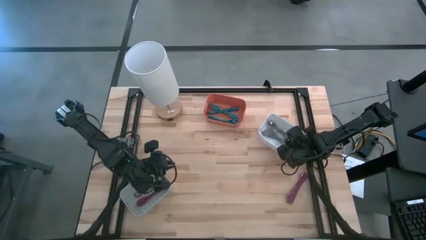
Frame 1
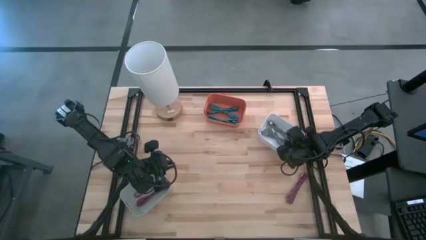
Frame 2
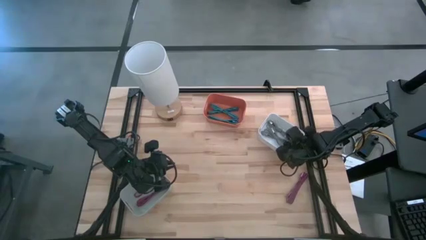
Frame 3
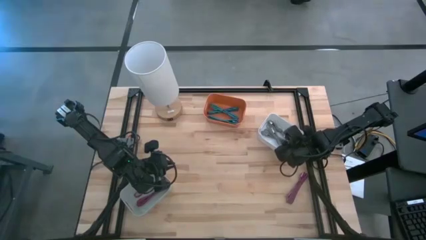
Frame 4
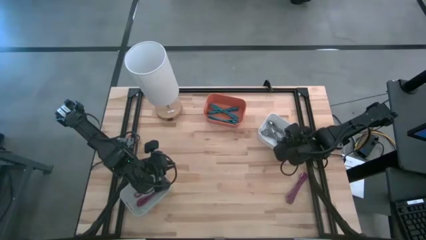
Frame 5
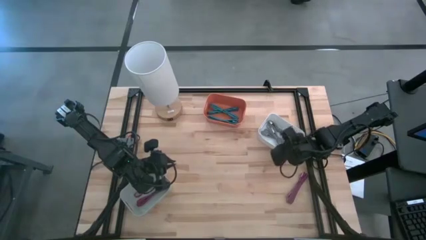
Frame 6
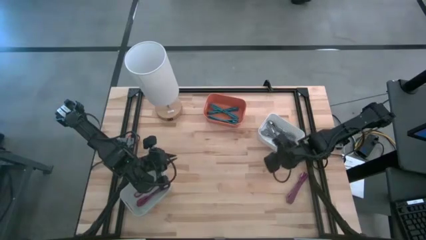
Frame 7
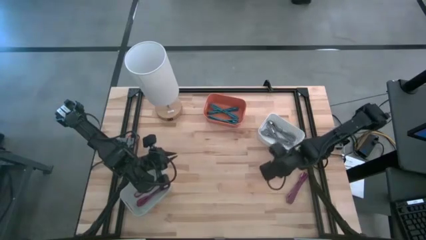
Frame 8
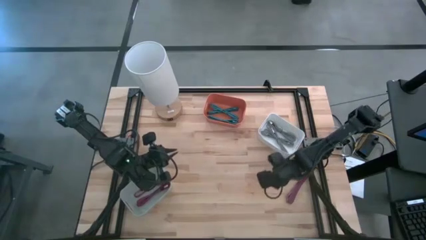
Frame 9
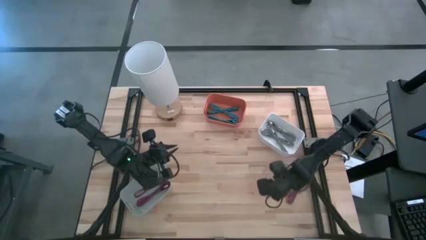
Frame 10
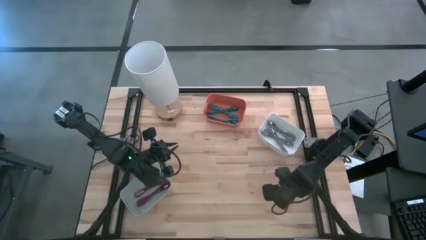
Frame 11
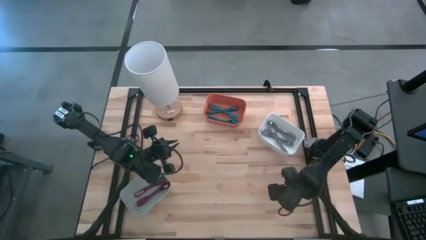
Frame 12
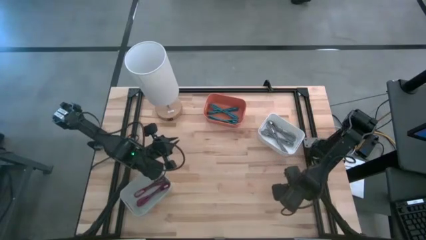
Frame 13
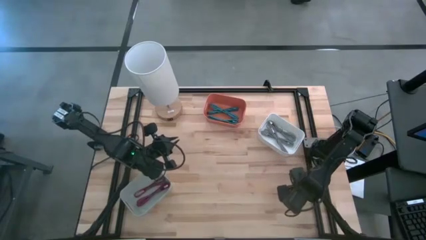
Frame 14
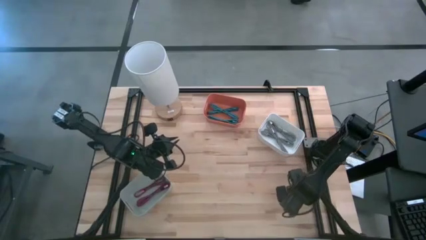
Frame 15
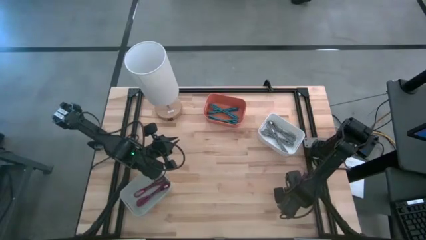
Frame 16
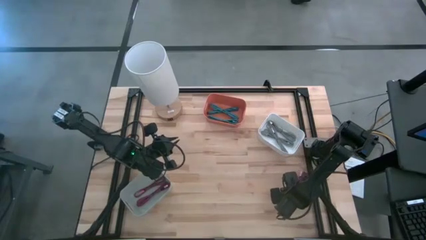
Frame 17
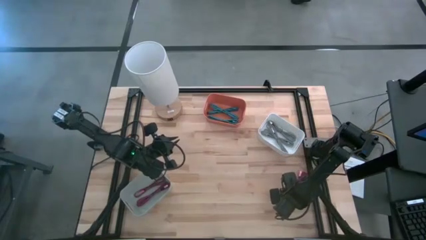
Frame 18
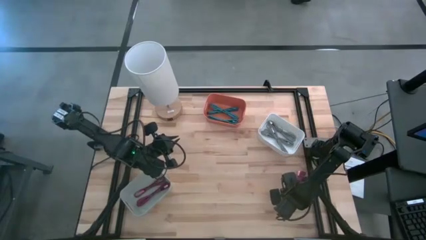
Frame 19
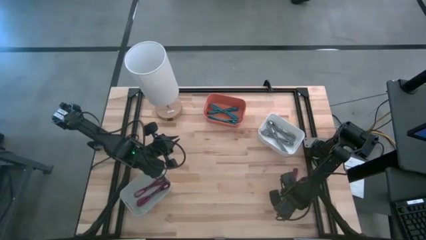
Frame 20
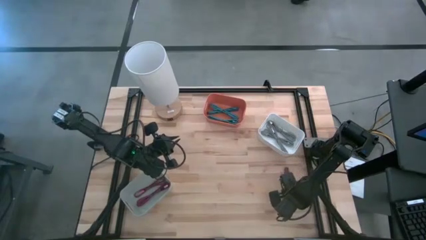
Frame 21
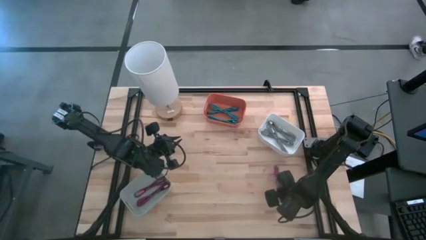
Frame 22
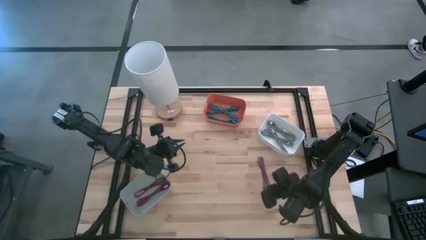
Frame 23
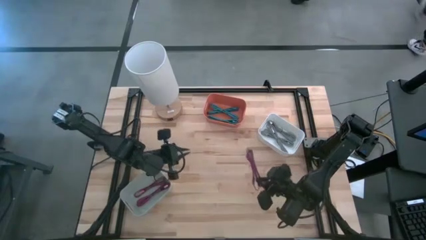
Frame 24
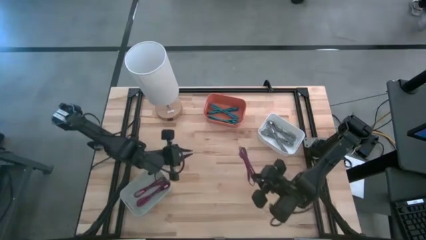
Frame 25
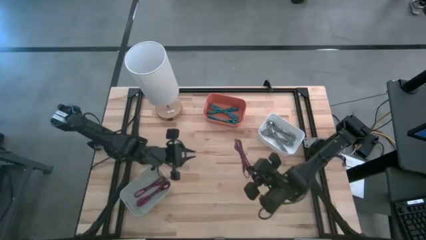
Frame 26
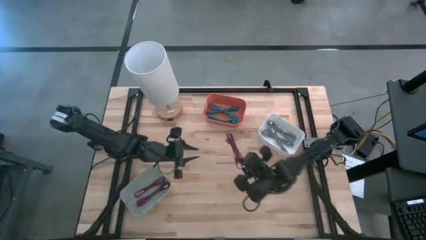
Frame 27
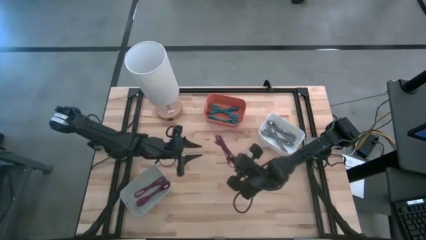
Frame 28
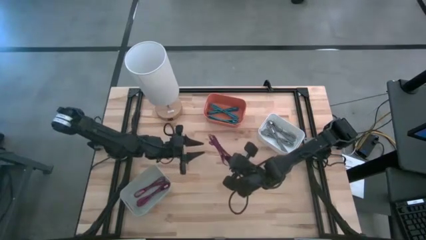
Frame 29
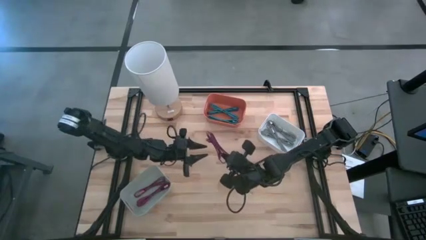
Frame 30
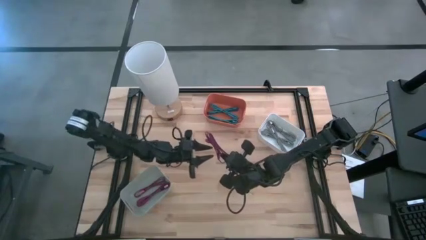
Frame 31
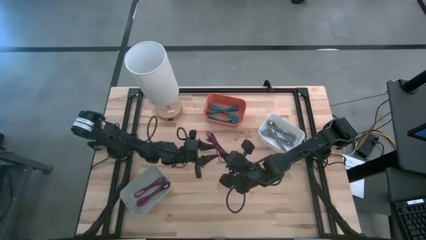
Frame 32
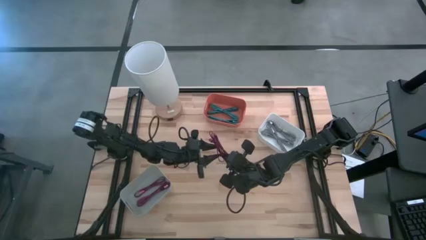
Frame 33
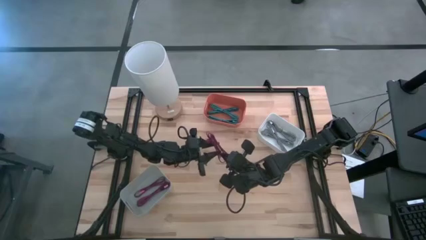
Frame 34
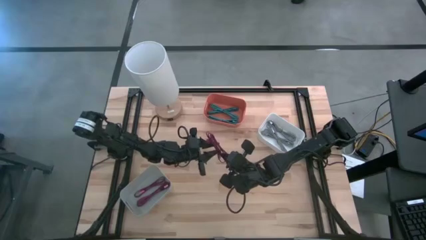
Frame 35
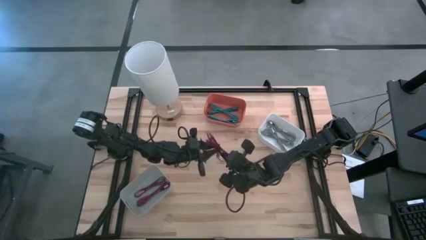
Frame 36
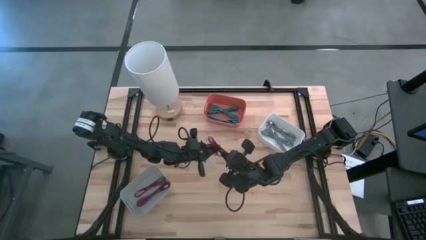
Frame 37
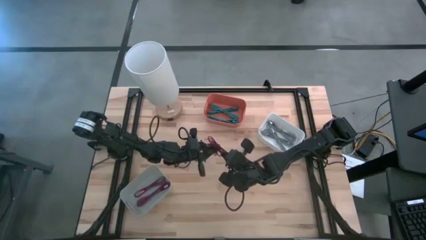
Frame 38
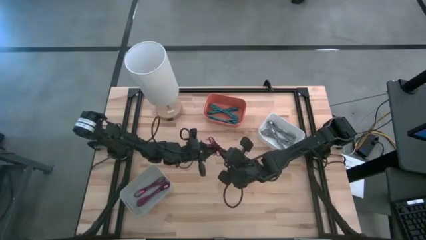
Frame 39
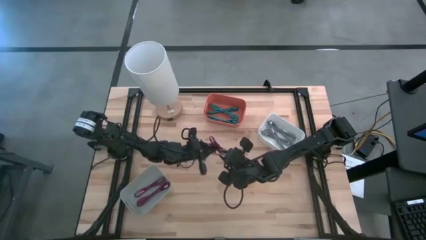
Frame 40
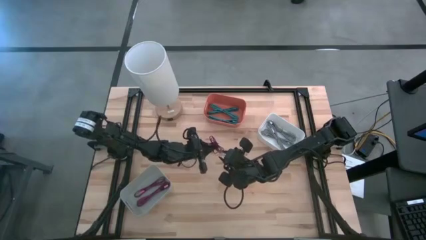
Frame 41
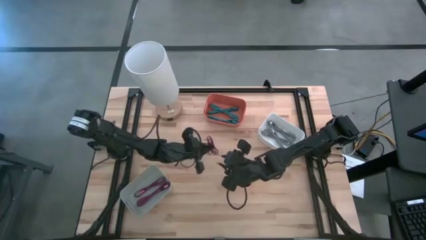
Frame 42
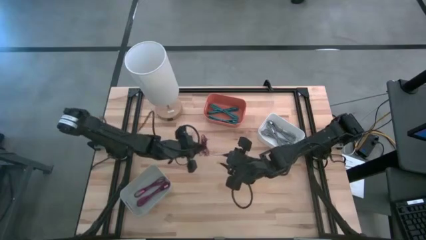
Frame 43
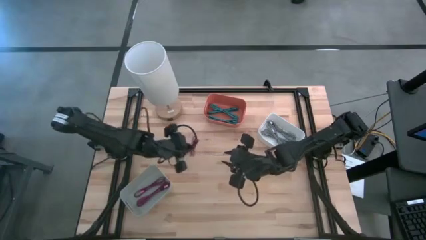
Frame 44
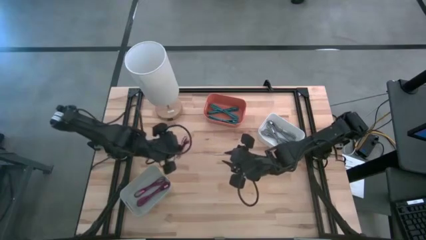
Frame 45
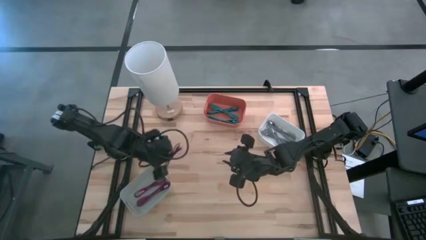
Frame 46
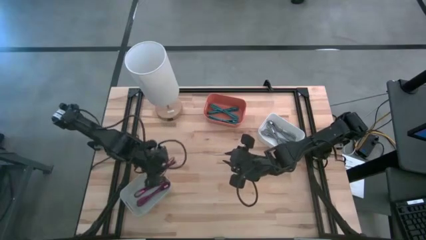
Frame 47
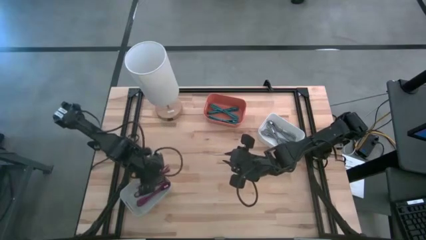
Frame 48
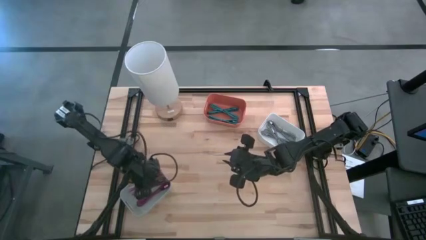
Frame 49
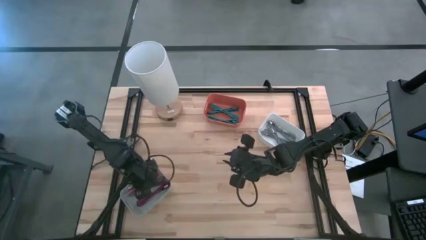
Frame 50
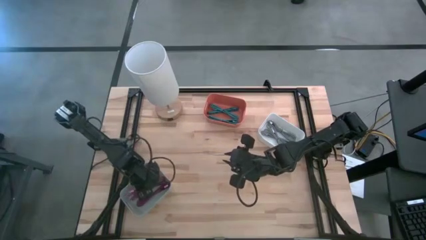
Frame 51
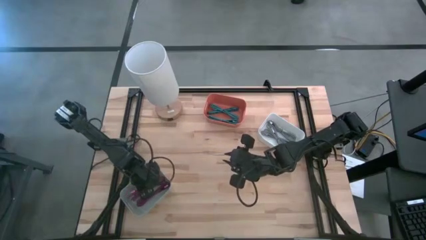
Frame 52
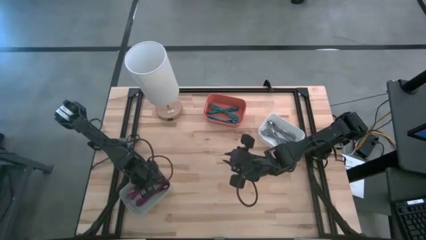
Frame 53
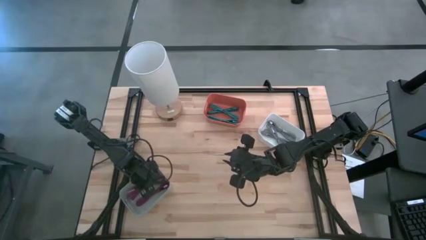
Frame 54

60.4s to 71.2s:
Task: Pick & Place USB Port
Put the black and pink charger cable into the gray bin

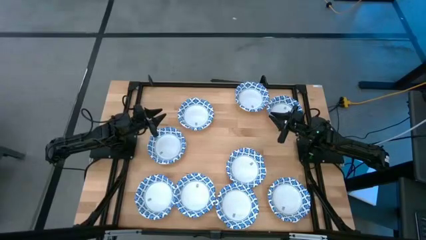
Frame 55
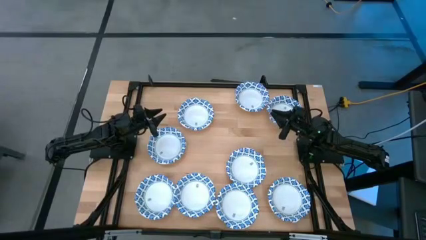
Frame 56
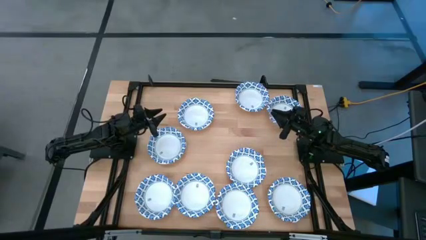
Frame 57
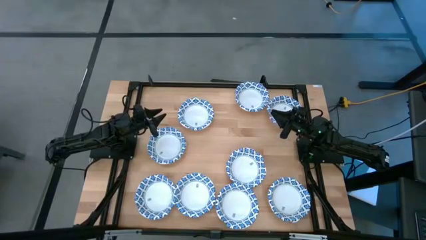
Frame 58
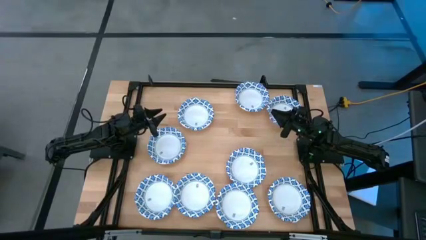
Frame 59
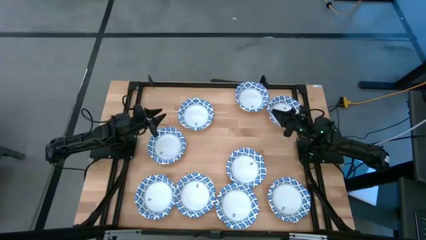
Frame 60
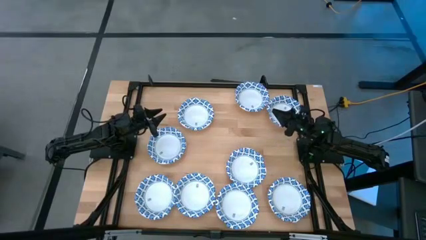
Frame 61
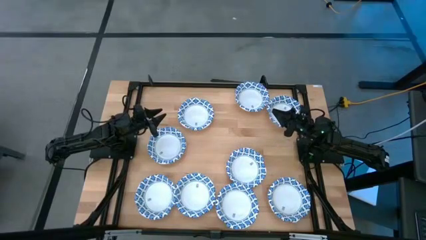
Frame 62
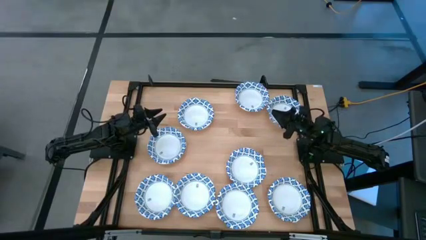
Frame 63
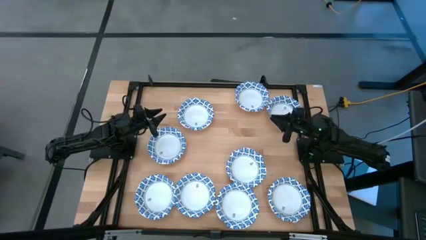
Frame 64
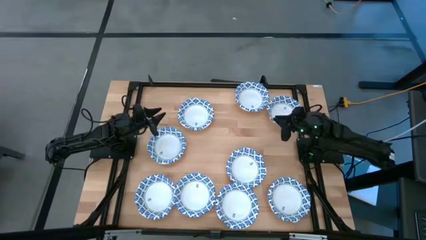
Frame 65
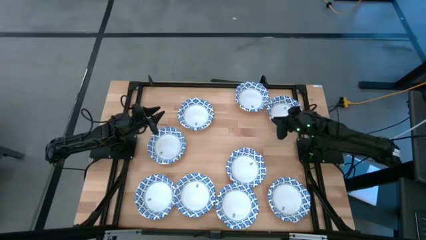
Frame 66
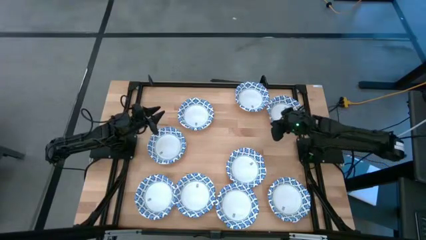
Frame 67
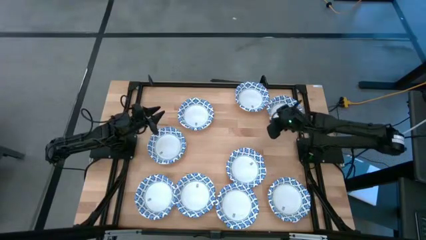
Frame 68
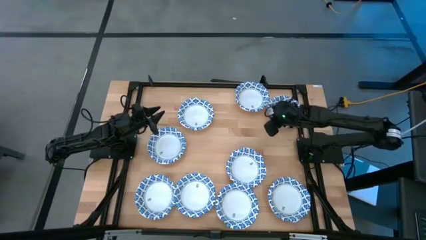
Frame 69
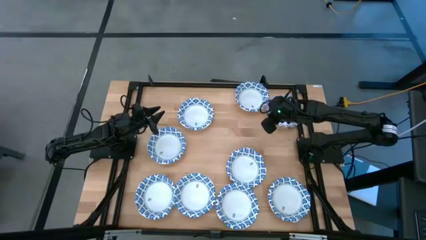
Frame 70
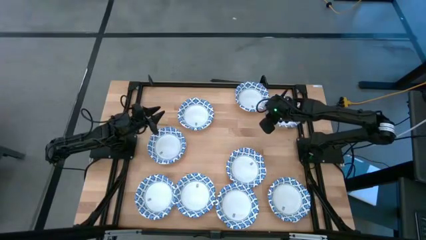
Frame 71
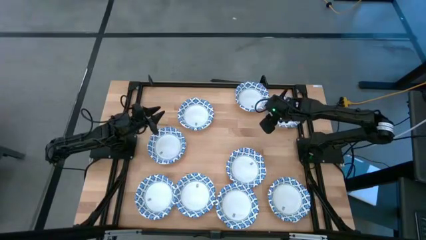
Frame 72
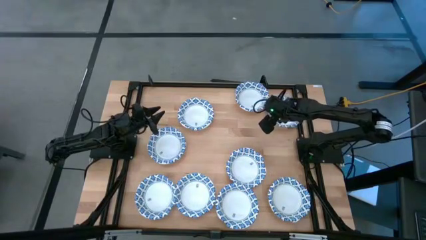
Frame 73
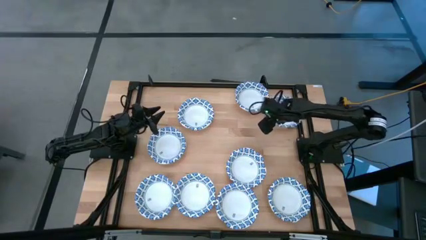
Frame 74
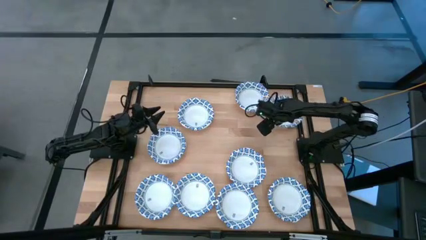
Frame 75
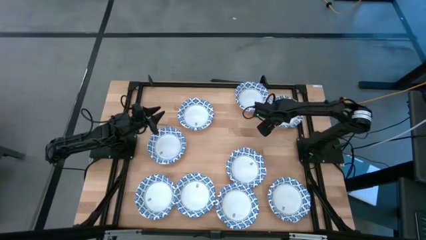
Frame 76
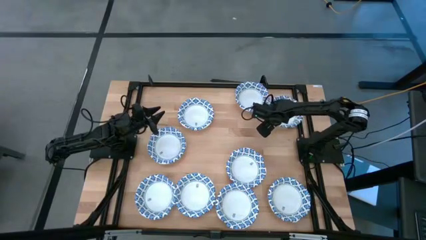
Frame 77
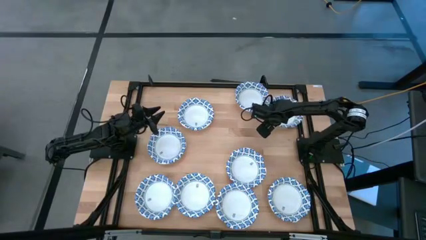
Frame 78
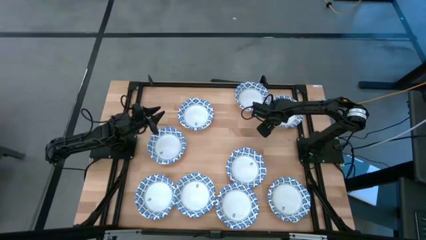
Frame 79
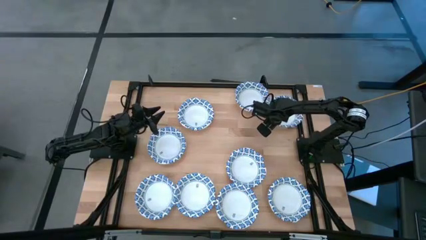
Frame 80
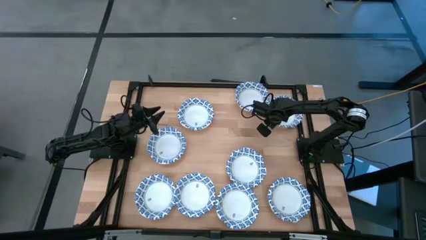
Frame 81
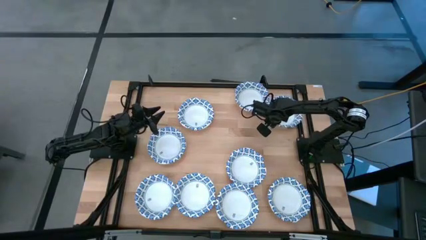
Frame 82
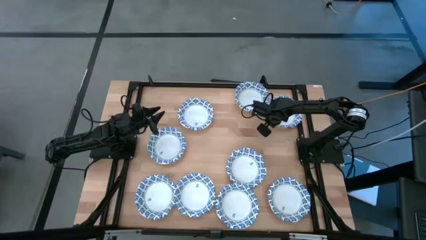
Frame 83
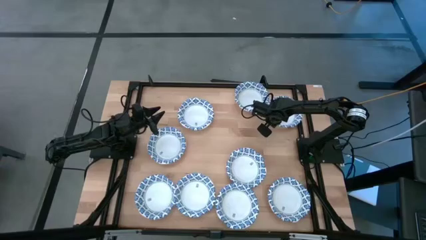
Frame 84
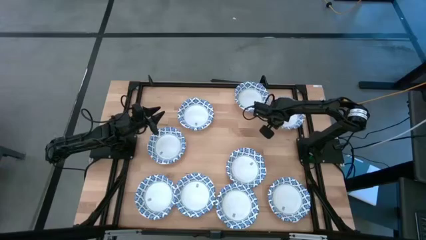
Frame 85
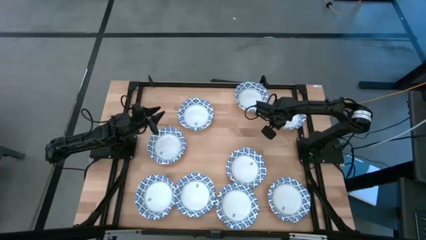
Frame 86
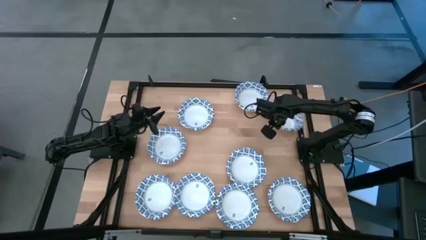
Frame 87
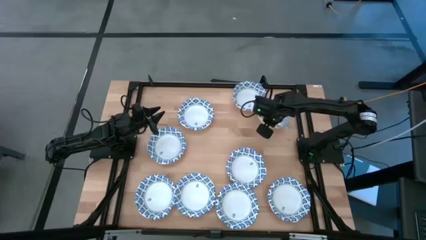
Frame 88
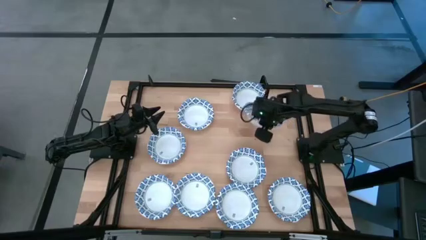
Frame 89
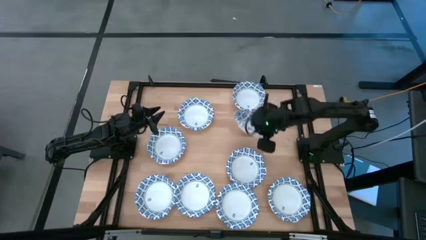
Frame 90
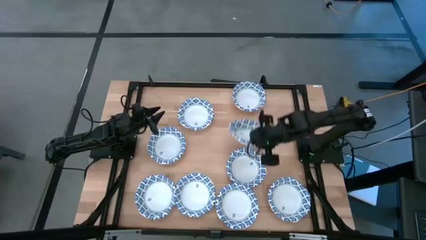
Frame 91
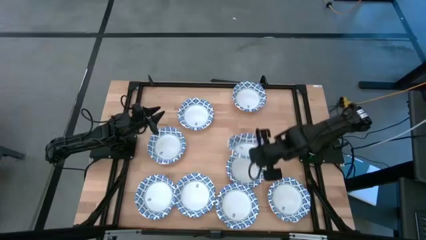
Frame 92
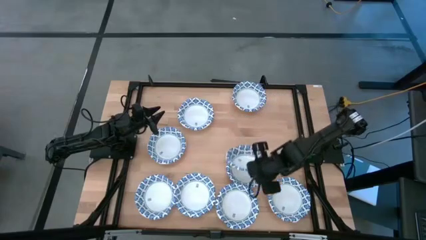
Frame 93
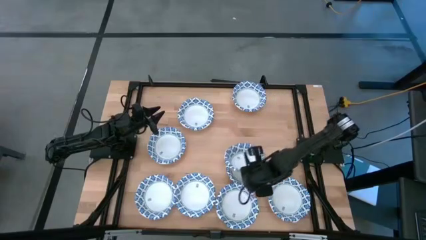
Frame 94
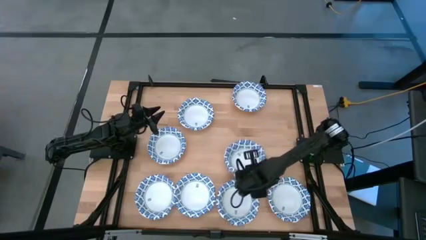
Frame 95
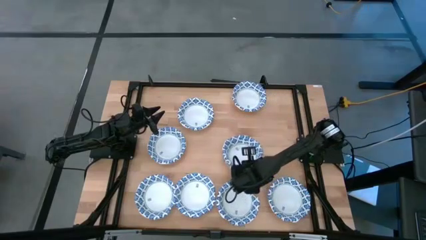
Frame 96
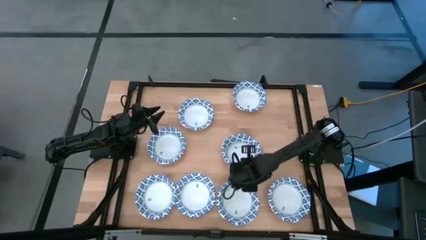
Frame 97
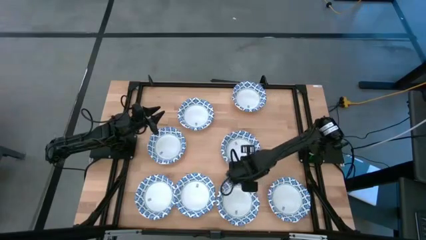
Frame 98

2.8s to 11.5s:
Task: Nest bowls inside each other
Stack the white bowl on top of the white bowl
